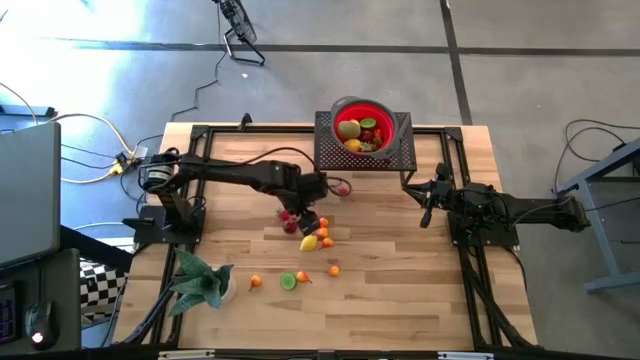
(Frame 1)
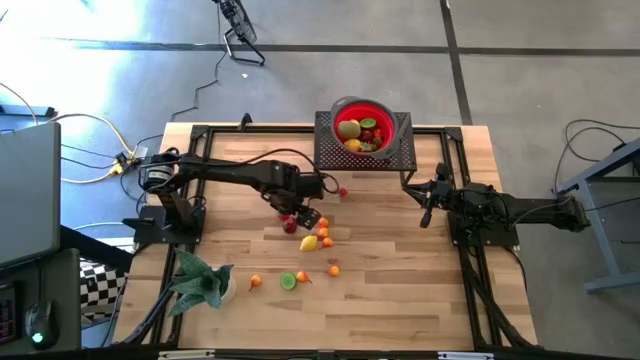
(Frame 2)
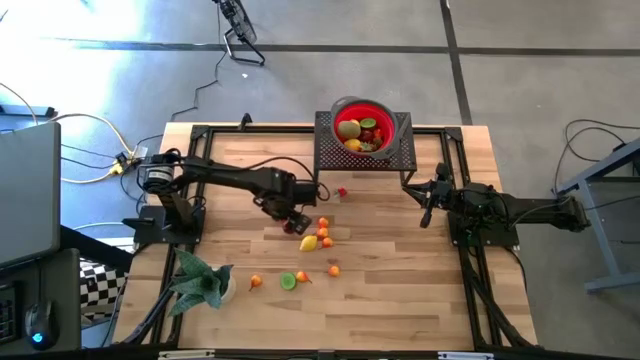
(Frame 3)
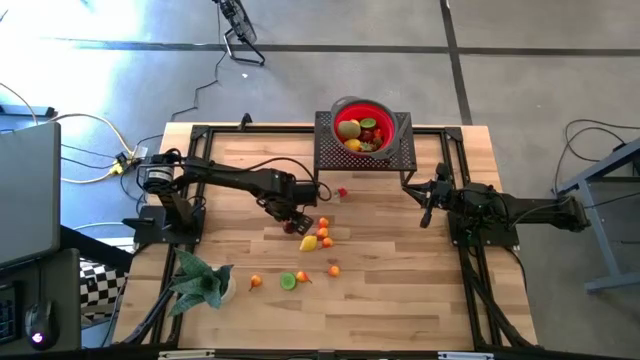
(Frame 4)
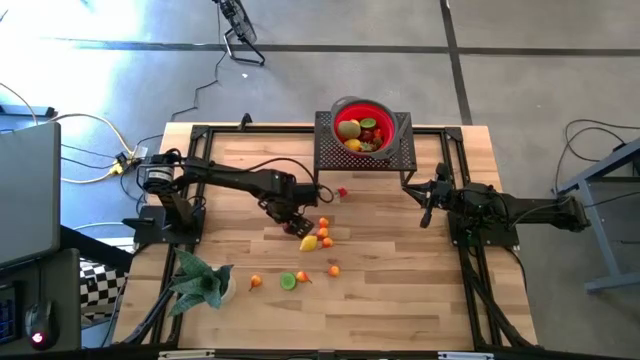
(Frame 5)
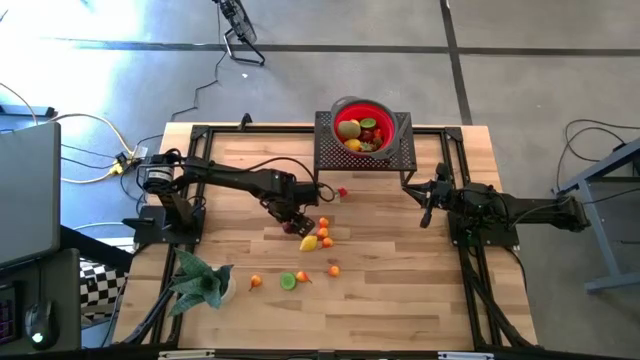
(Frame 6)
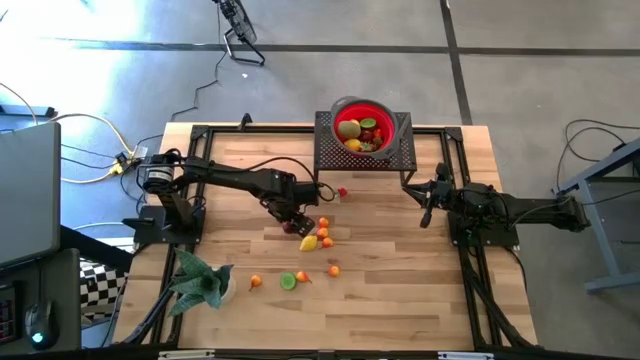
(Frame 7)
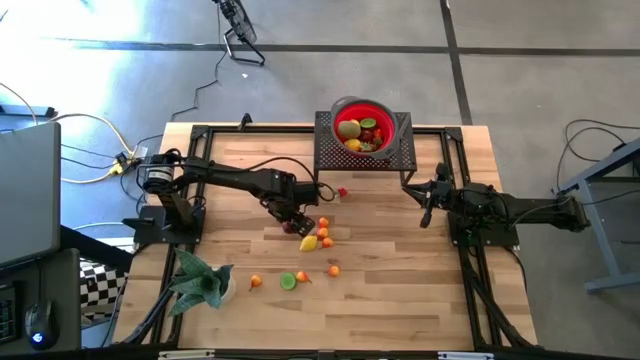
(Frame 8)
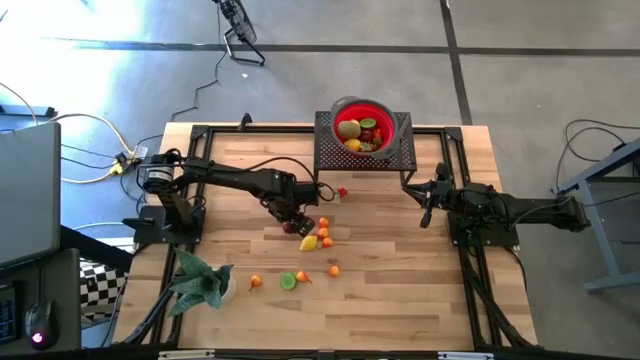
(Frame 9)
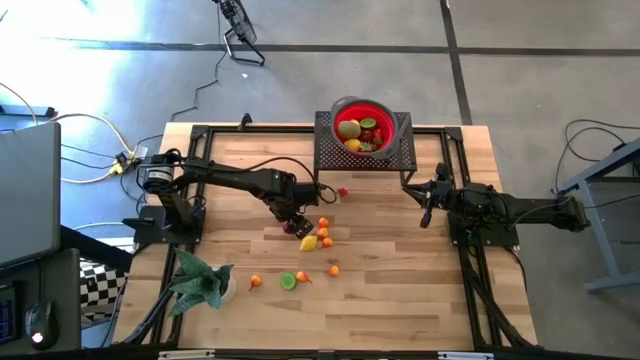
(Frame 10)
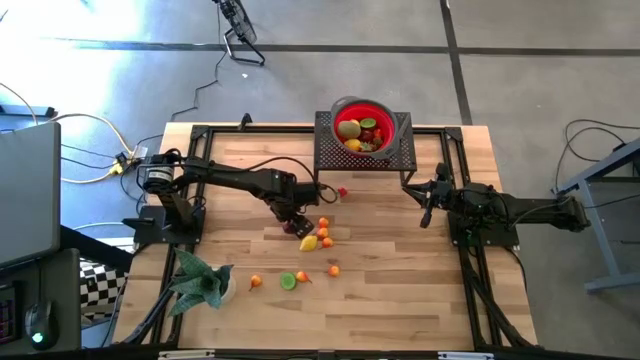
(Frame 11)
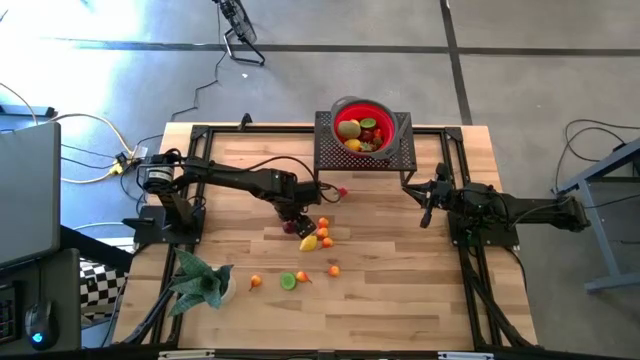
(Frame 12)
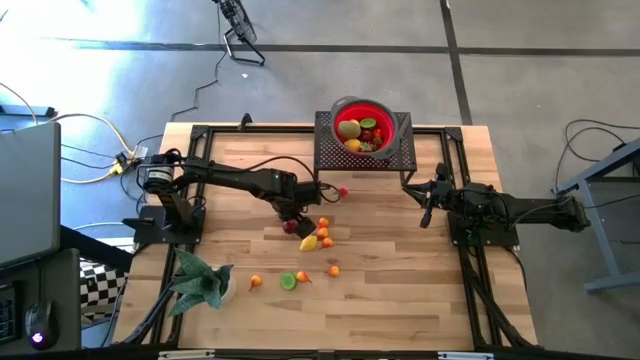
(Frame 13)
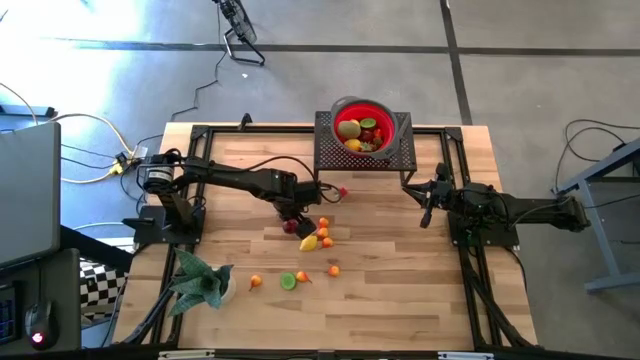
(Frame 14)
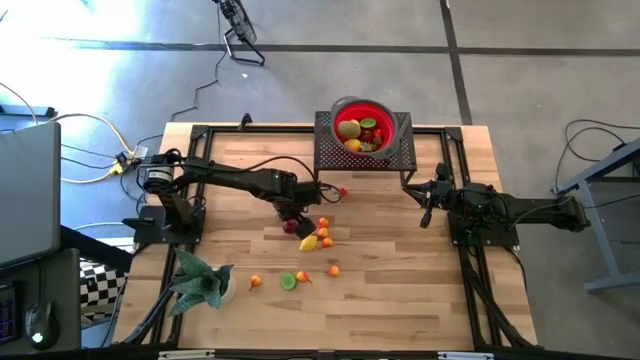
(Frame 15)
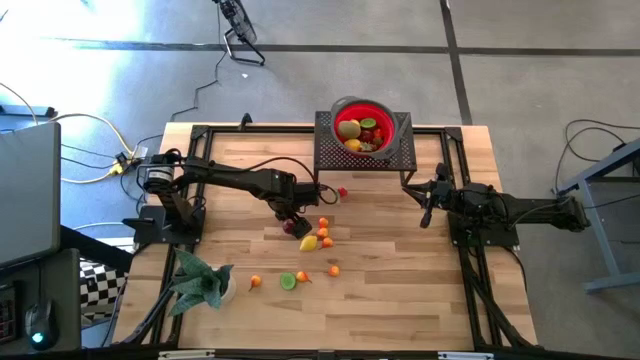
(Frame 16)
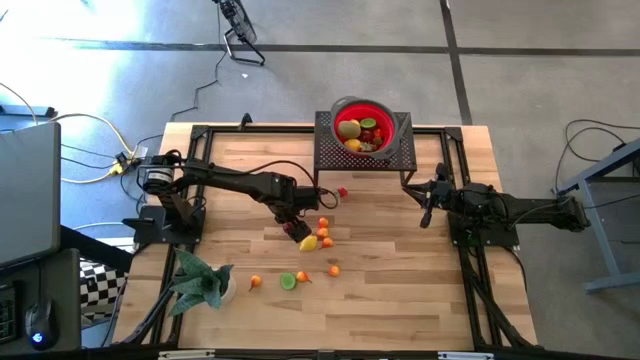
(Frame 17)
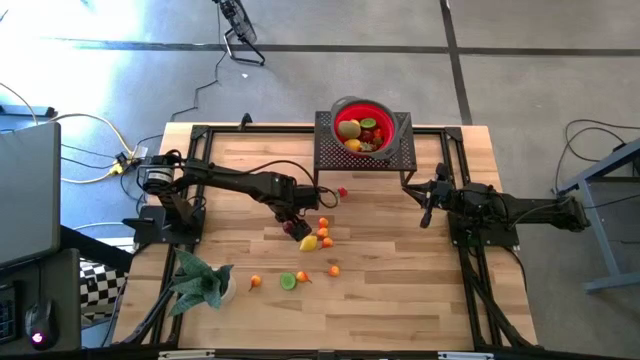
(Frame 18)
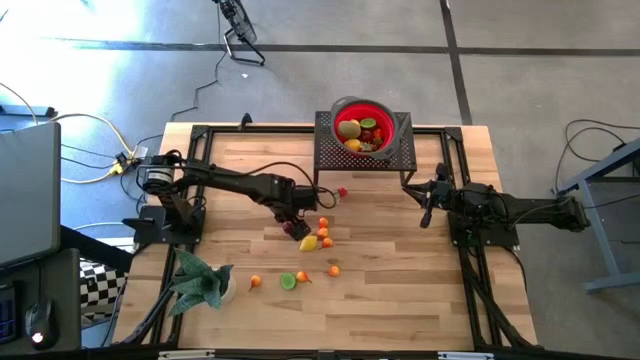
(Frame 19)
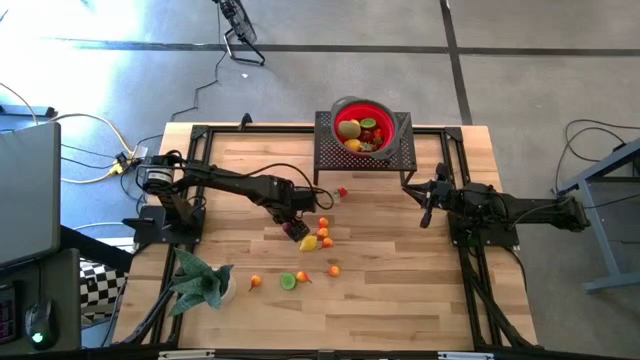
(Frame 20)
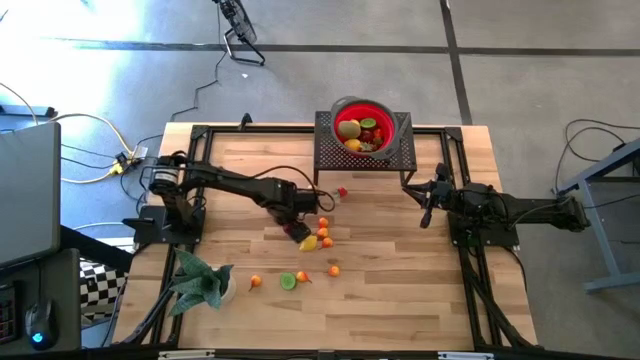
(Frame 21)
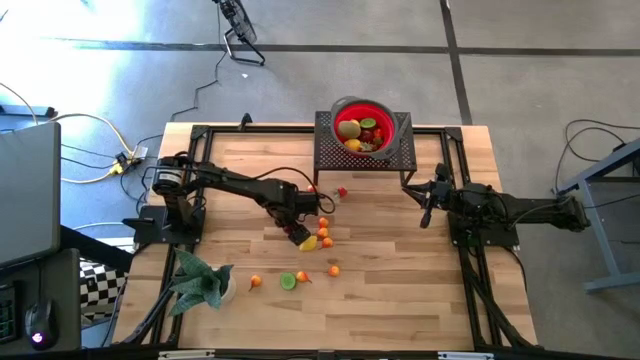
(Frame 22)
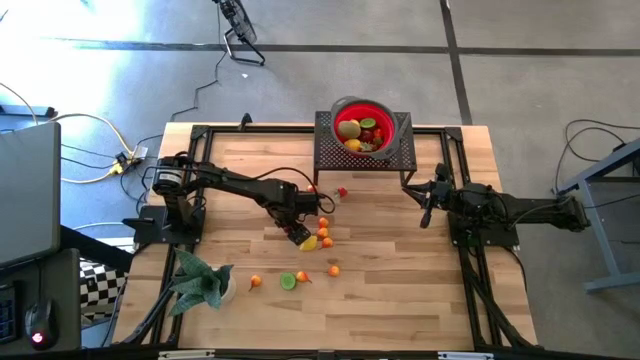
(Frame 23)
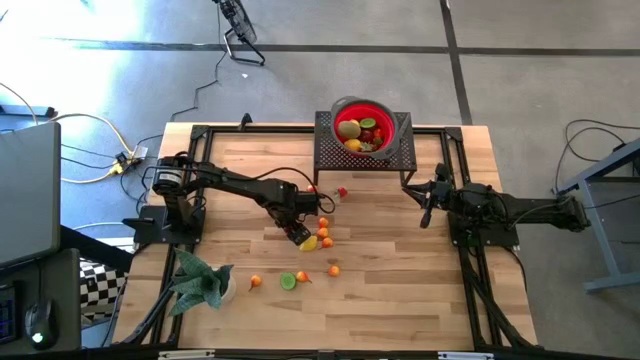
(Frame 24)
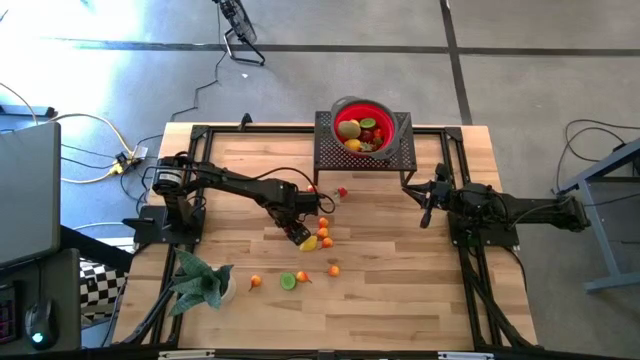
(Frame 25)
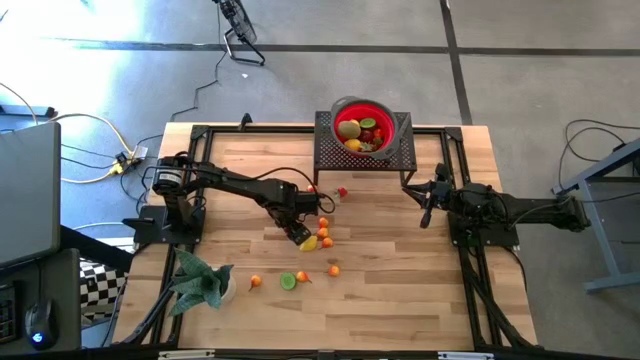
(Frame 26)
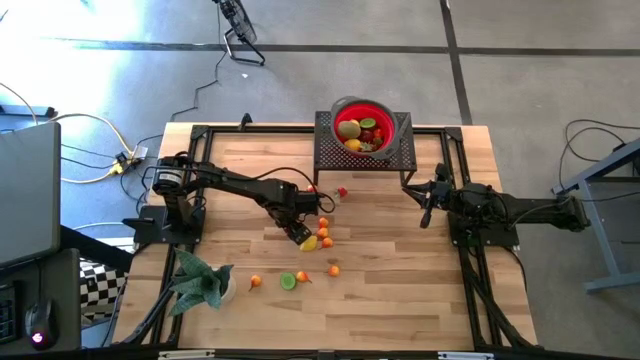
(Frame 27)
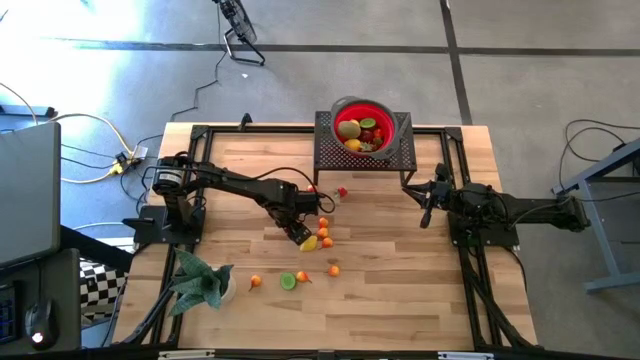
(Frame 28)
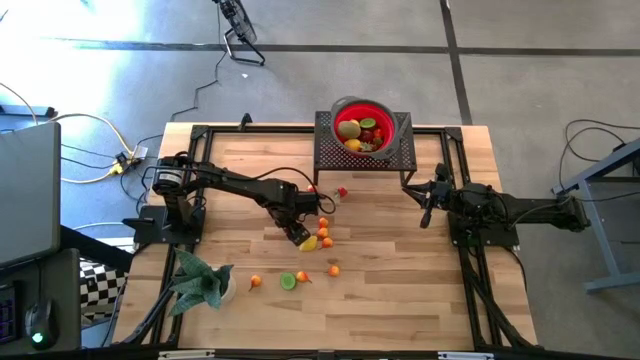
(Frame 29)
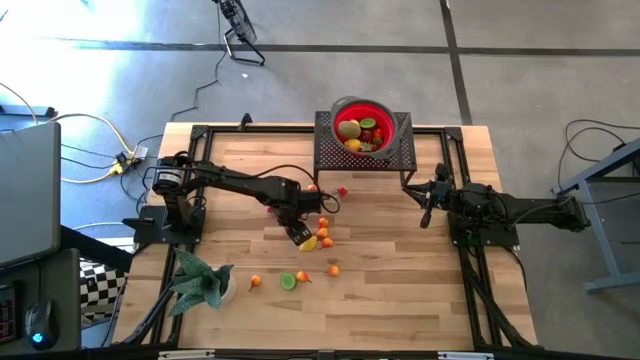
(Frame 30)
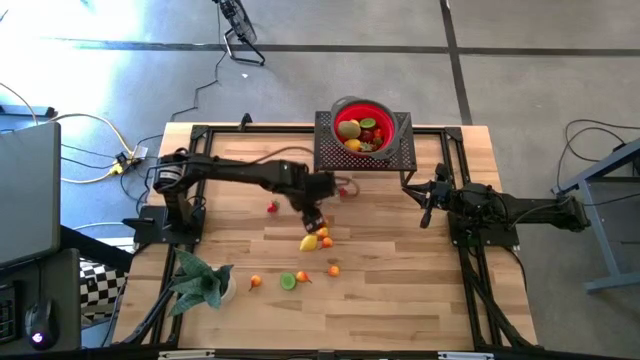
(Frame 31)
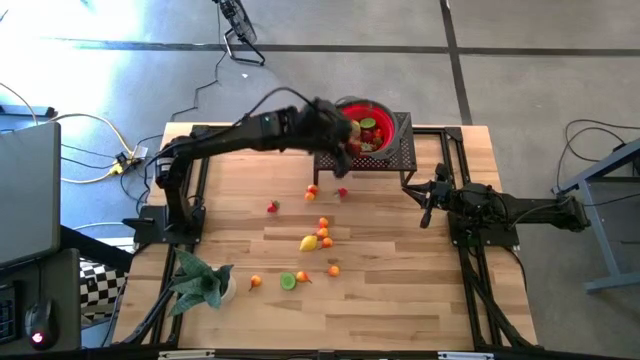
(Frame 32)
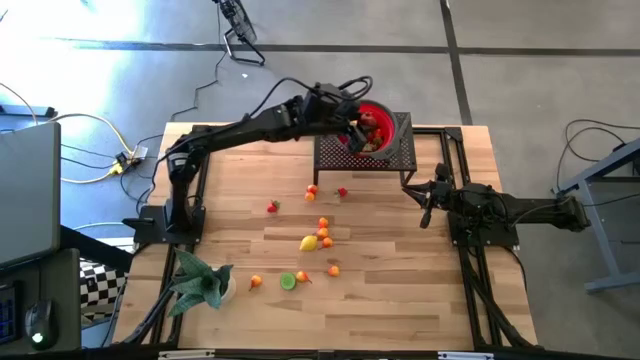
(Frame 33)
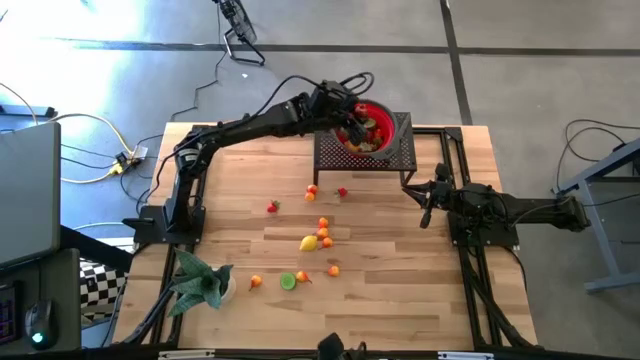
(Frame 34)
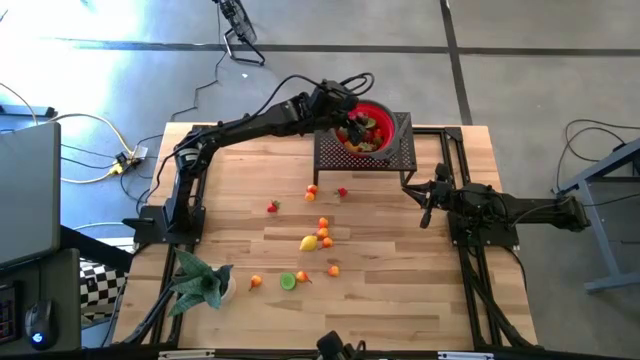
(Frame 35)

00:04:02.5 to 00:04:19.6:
Task: Pick & Place Fruit
Put the pomegranate into the strainer on the shelf

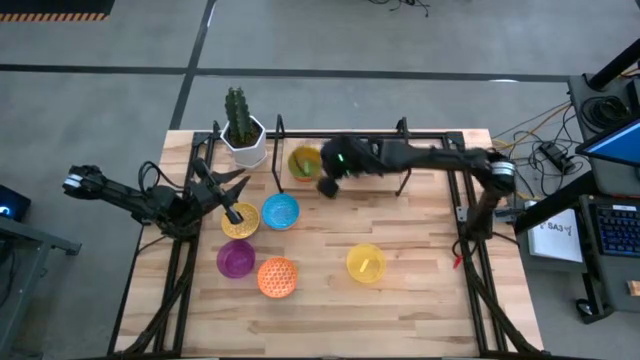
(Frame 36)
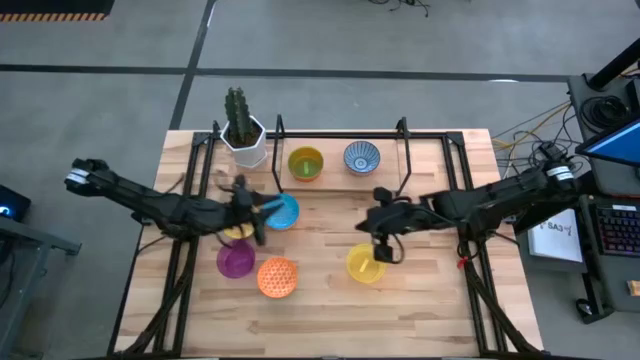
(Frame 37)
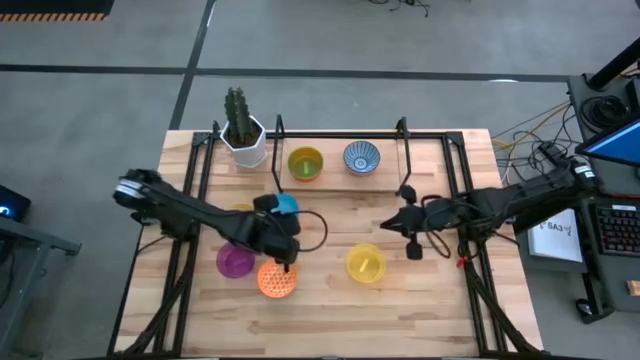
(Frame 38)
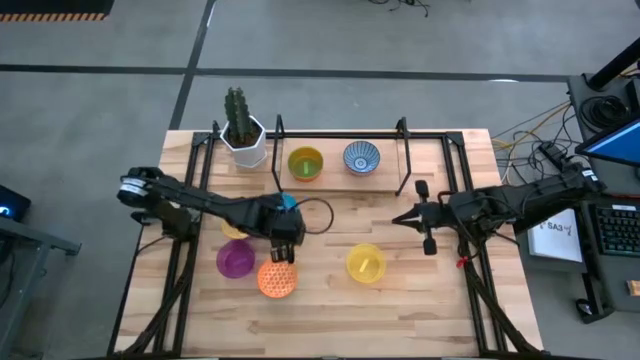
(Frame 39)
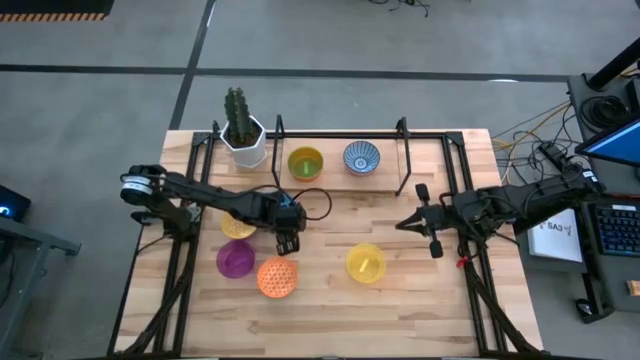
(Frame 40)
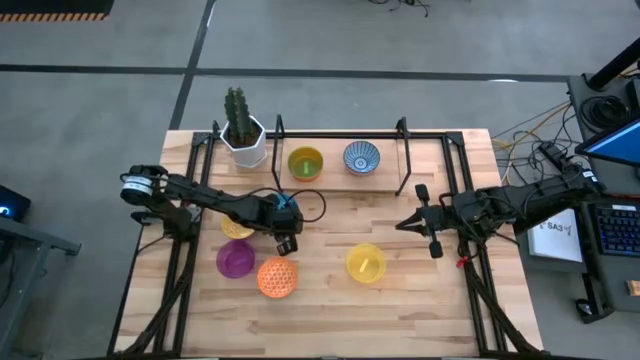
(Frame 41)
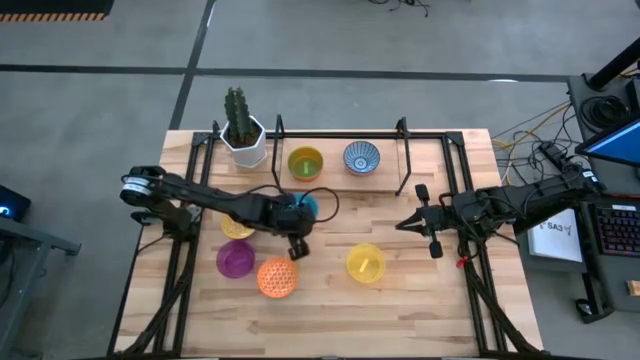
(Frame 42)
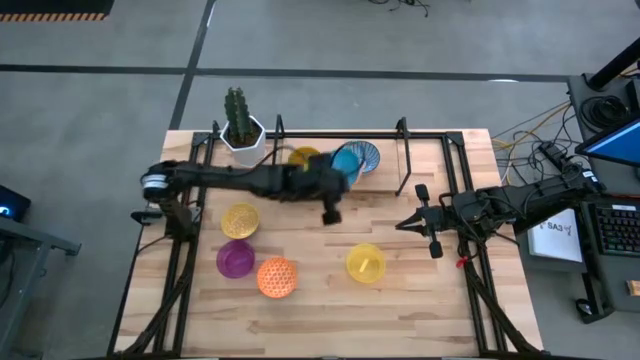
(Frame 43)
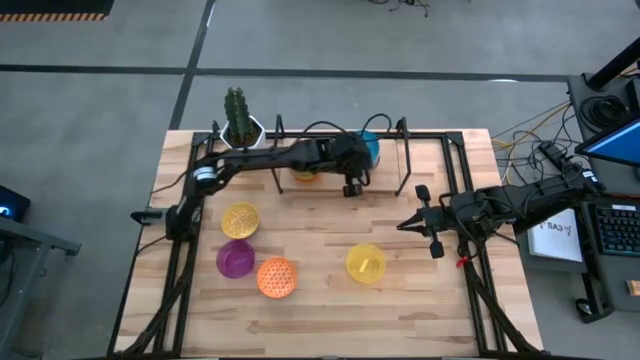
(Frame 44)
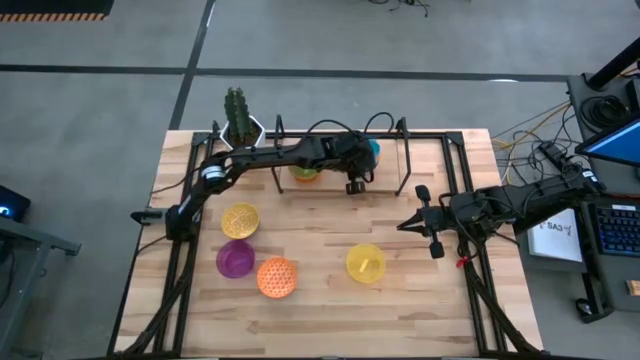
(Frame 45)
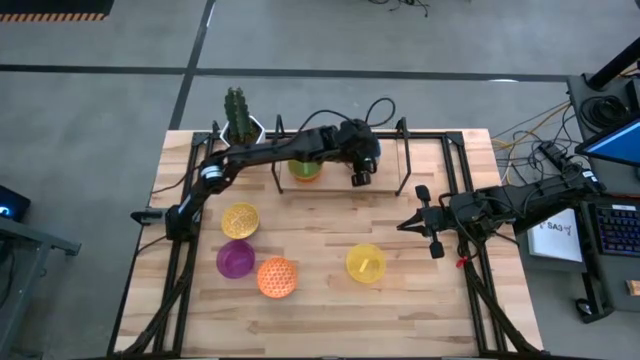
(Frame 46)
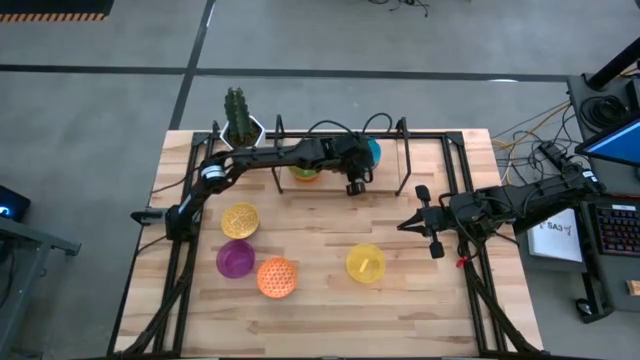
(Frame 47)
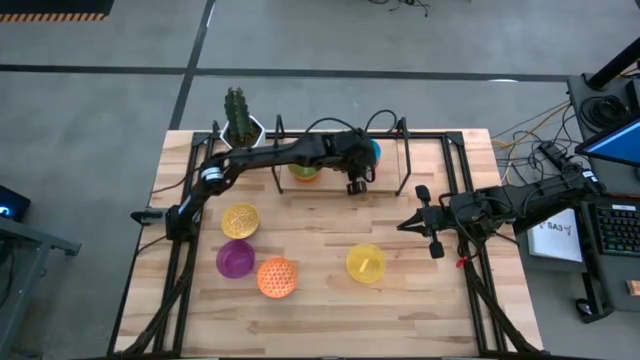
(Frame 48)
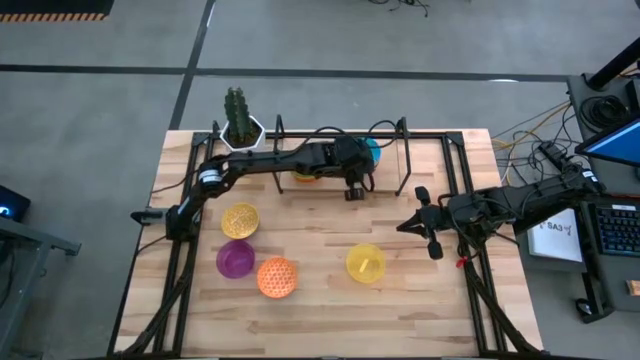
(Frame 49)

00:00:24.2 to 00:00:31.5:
Task: Place and stack bowls onto a shelf
Stack the blue bowl on the blue patterned bowl on the shelf
